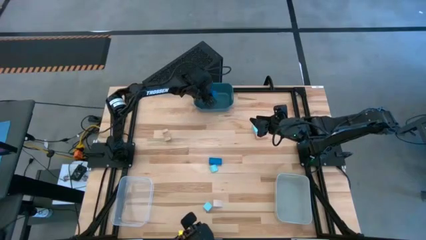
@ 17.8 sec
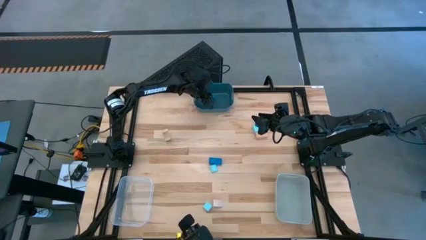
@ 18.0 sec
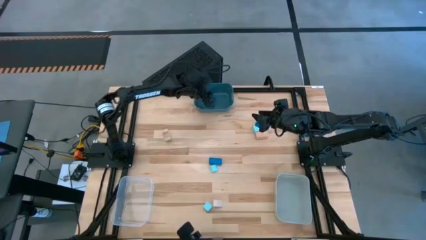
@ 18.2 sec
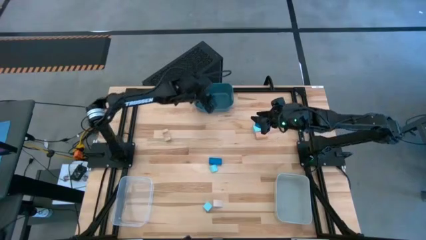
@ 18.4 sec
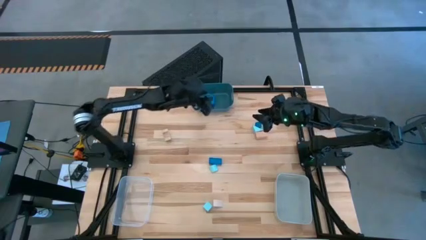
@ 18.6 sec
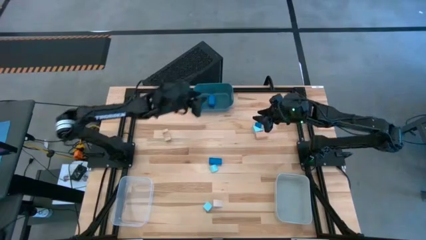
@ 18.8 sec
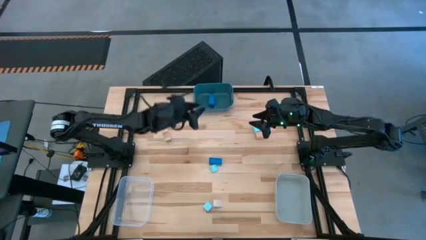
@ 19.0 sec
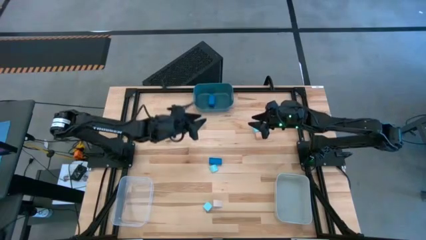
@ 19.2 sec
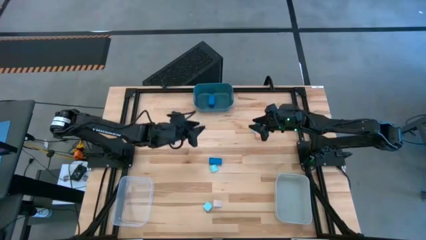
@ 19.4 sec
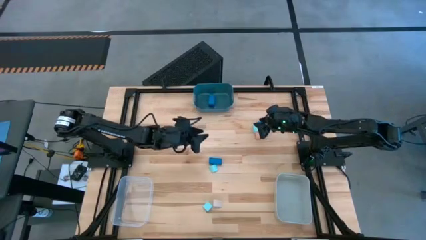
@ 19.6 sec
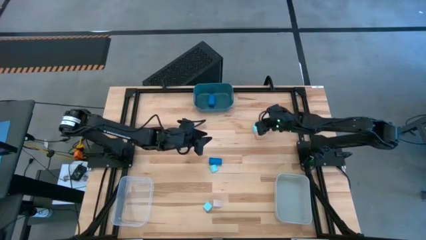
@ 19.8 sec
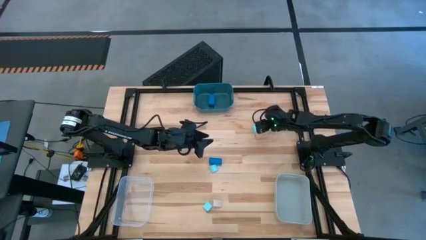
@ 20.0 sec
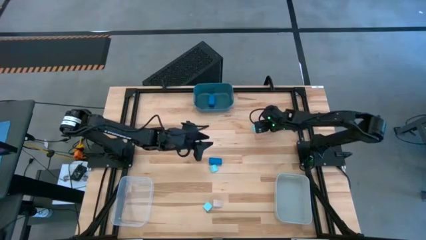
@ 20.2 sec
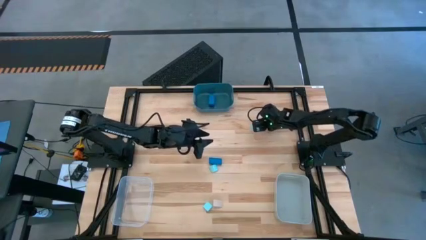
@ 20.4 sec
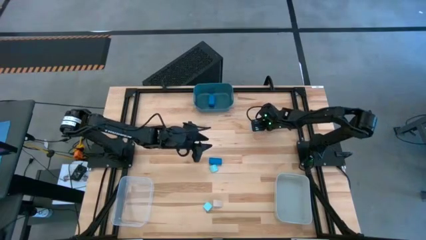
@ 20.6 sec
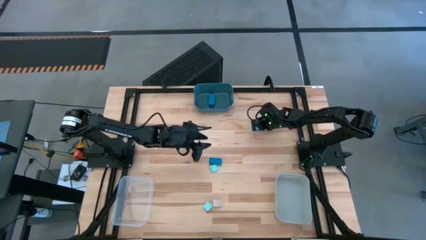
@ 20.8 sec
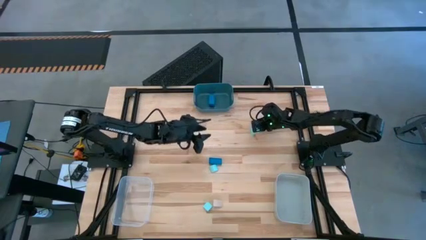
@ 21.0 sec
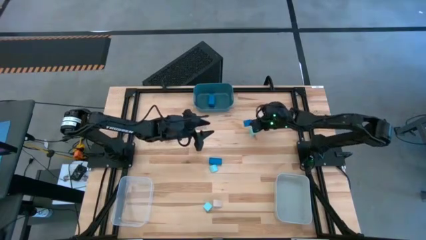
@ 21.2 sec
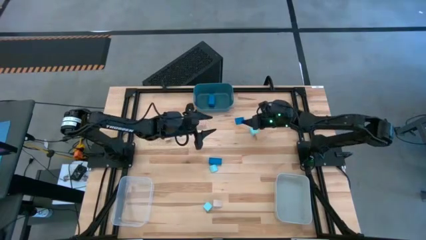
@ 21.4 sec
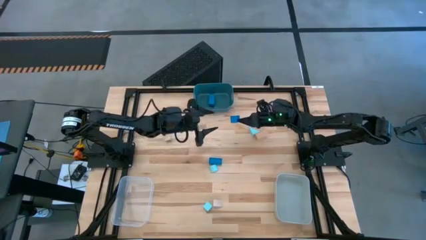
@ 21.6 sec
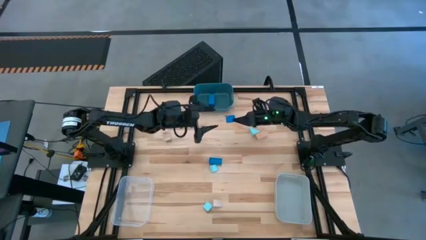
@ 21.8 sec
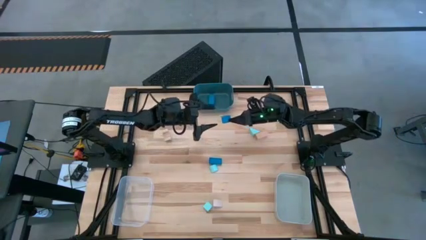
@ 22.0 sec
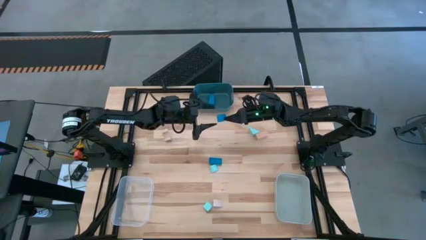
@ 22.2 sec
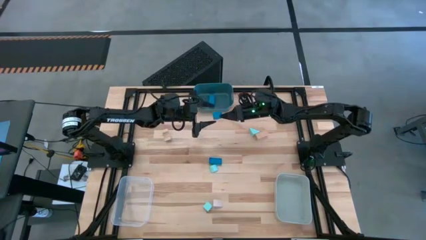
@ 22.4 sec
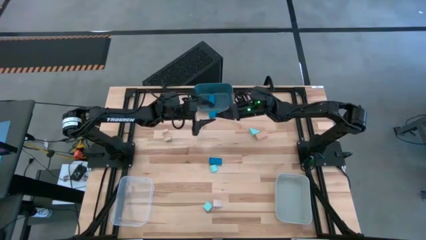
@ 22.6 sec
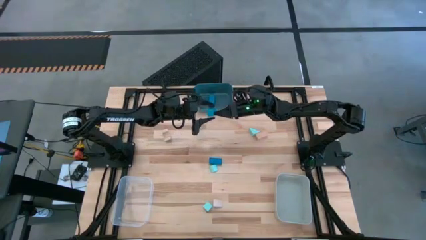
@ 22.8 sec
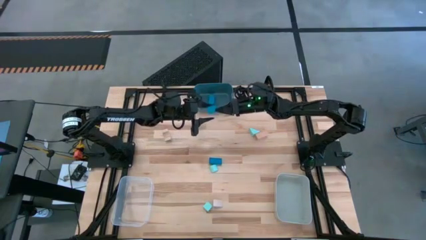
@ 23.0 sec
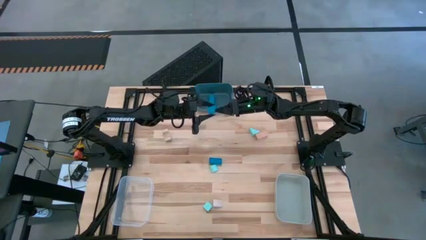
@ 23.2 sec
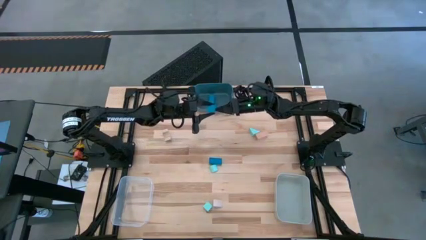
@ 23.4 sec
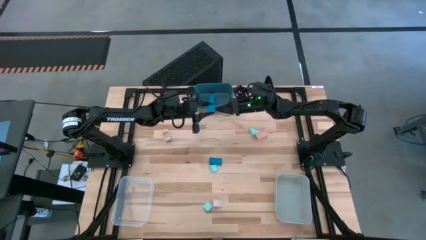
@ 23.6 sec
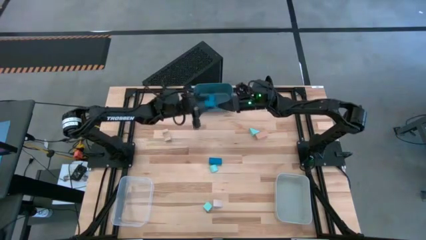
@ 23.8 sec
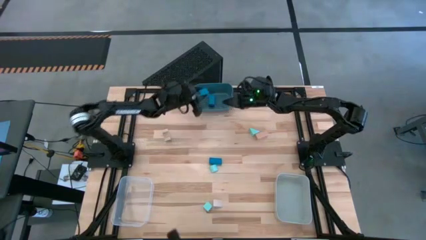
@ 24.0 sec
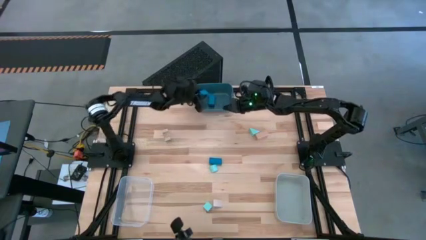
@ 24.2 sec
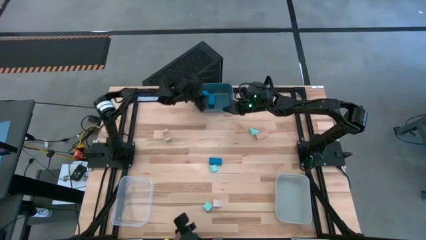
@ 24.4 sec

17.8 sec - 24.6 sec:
Task: Sort & place blocks by color
Put the top blue block into the blue bin

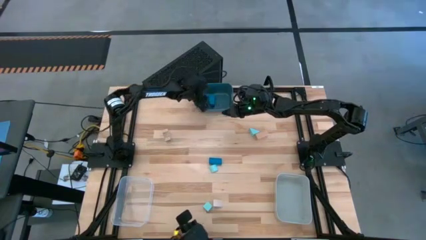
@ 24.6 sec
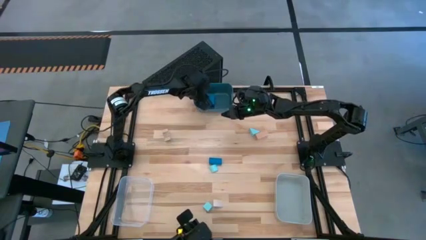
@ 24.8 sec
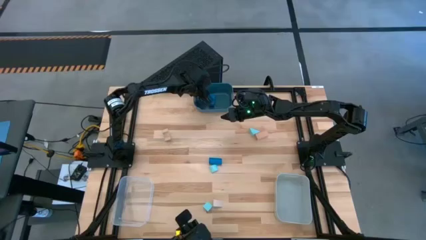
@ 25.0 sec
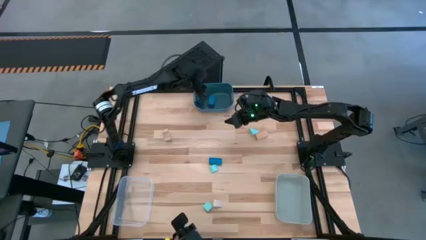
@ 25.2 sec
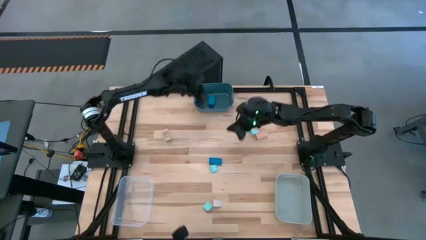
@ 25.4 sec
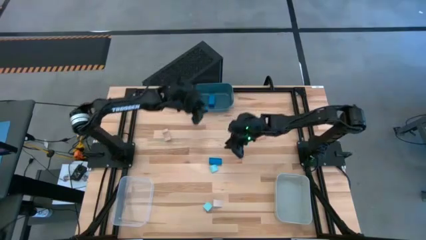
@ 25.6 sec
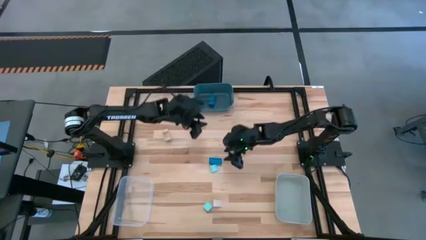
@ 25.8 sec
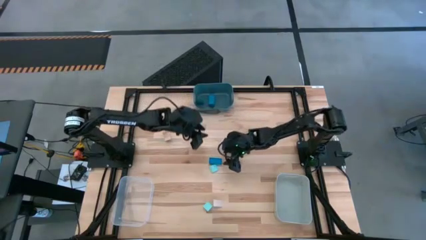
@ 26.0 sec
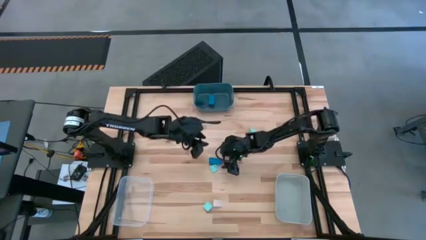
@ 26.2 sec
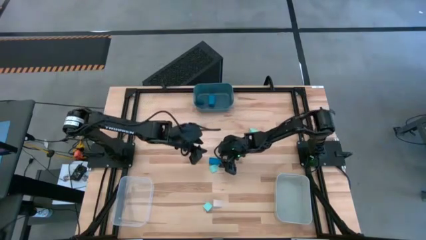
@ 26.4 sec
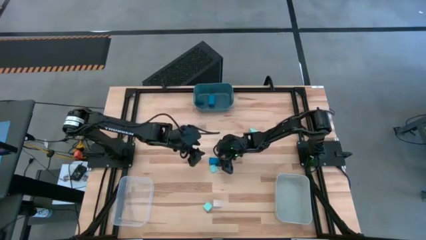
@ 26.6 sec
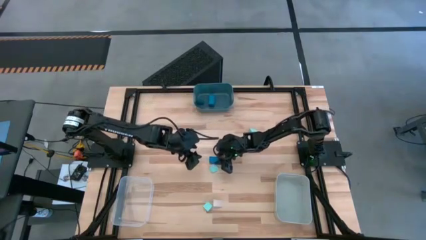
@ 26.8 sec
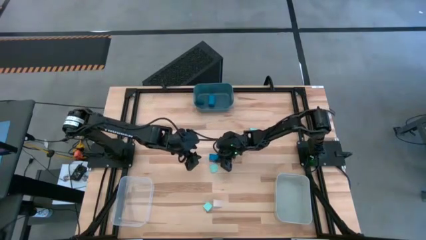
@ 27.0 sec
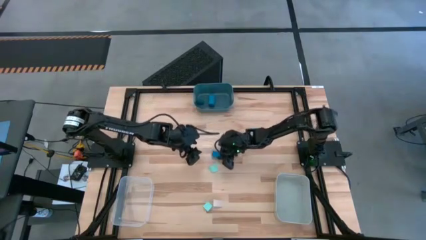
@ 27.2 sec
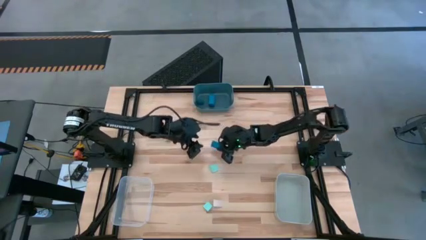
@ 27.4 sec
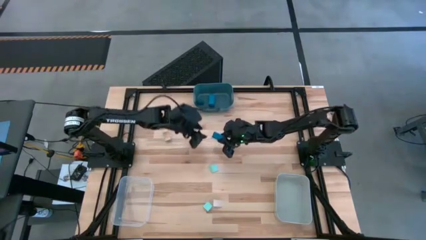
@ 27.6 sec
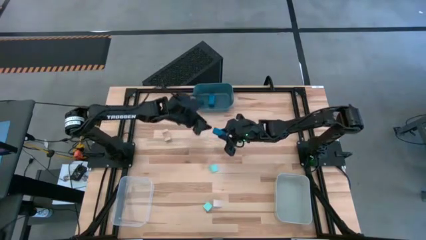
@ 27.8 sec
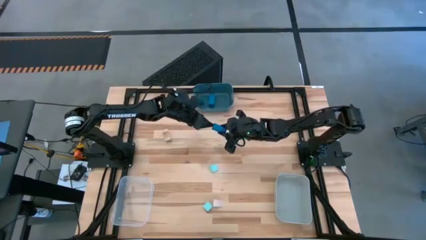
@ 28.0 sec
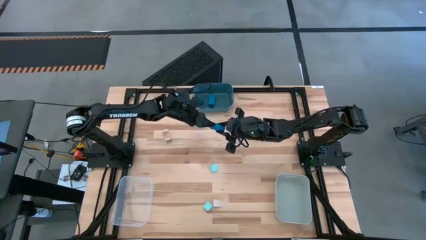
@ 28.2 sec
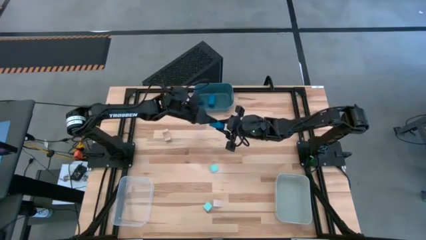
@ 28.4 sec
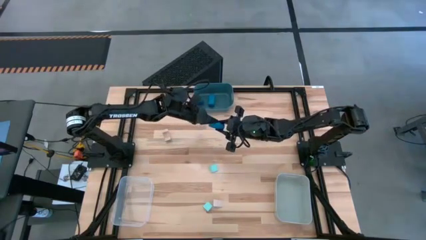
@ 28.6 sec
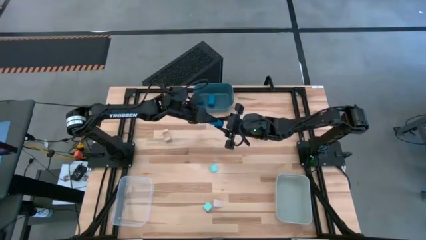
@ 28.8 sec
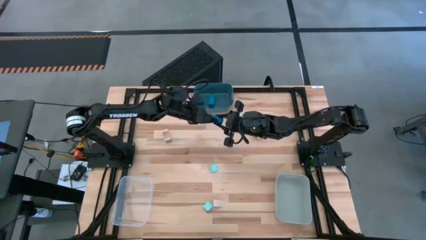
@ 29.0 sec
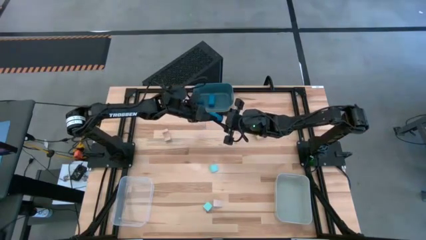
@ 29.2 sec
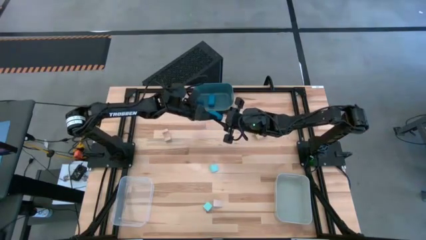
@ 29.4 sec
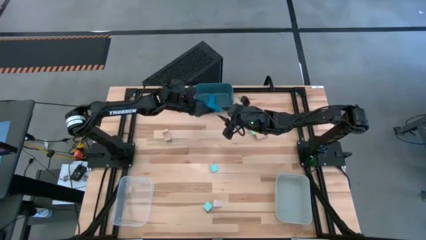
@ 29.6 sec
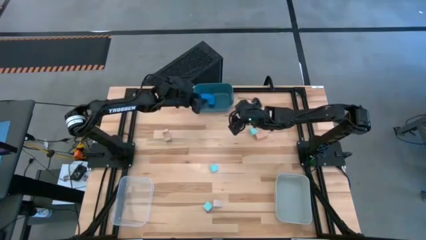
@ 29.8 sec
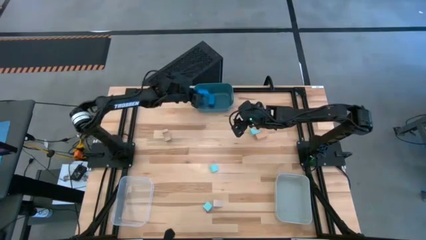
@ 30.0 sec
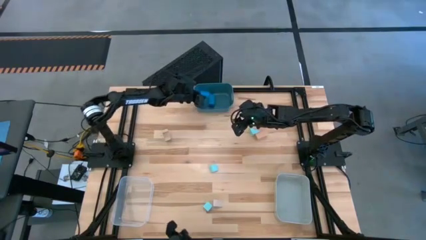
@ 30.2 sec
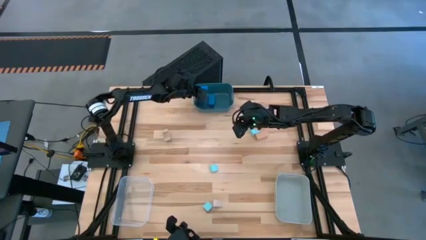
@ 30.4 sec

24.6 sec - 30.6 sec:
Put the blue block into the blue bin
